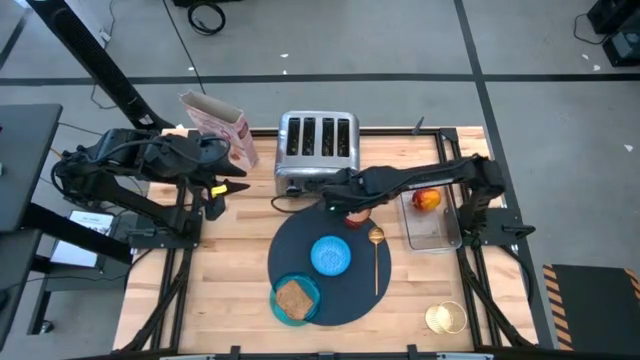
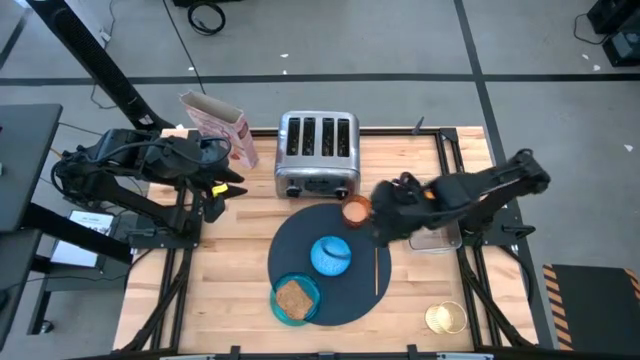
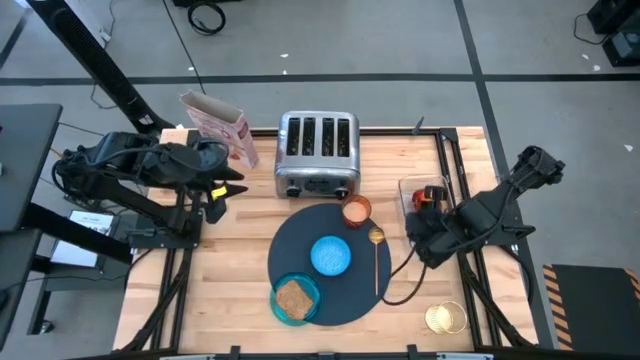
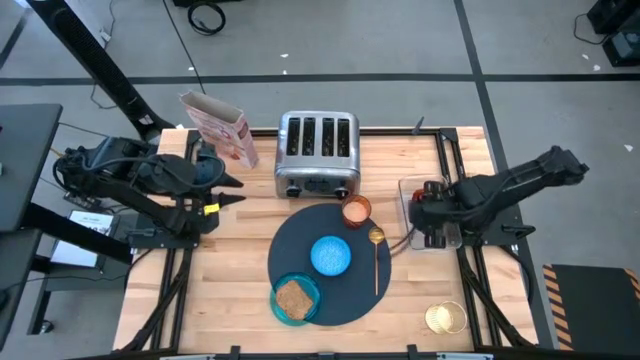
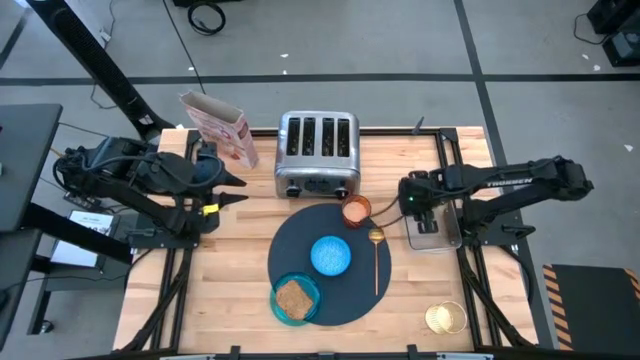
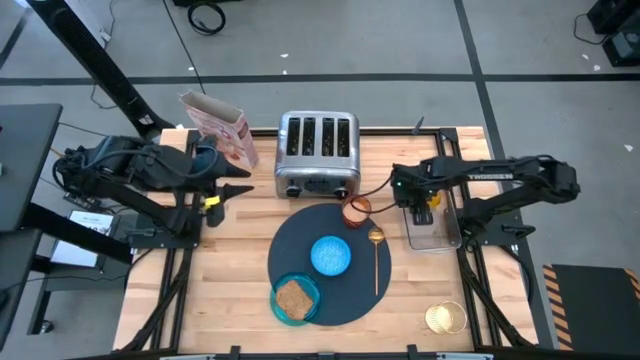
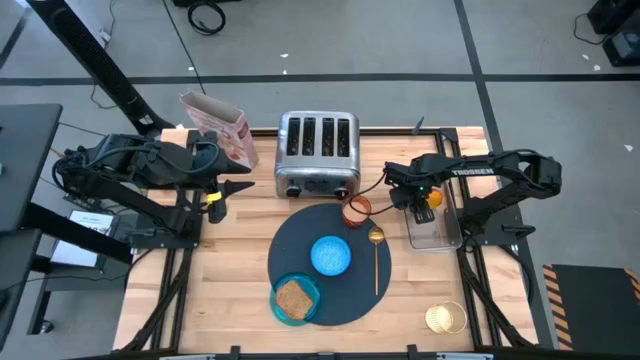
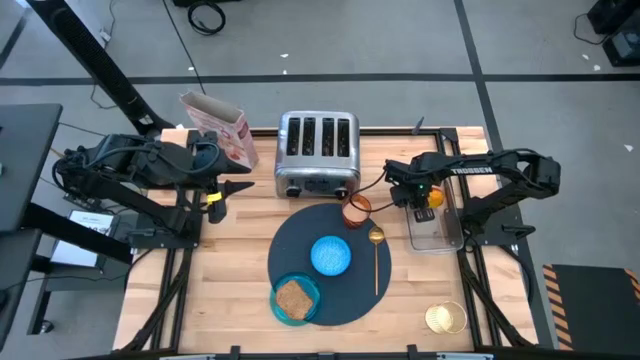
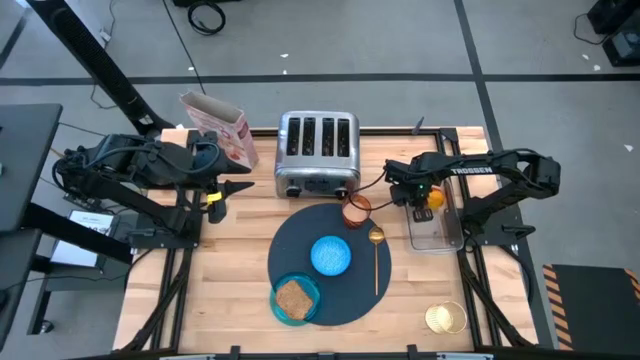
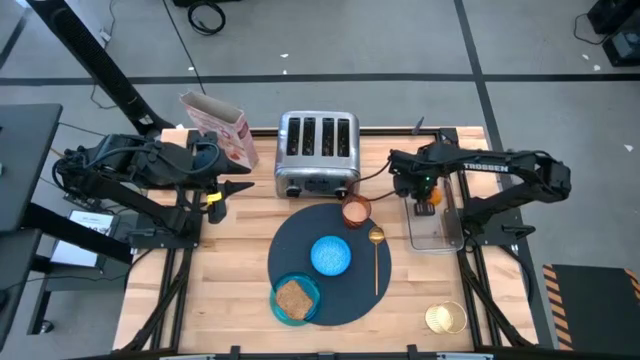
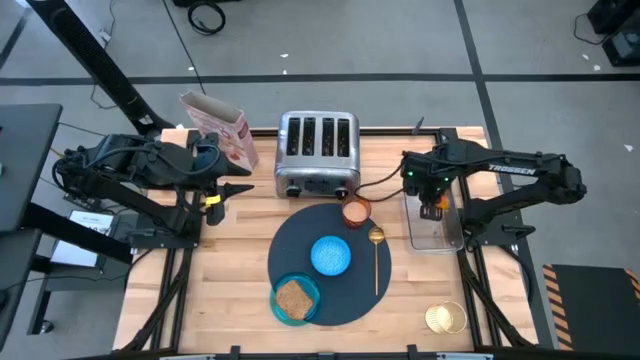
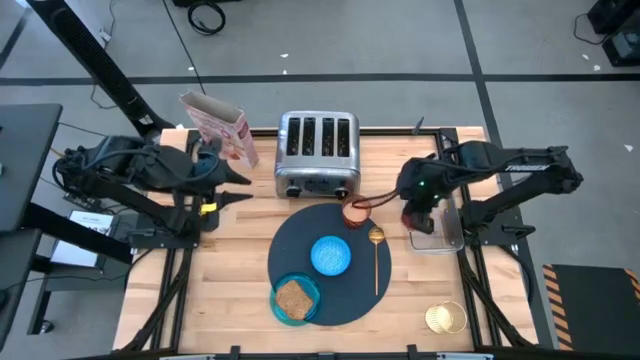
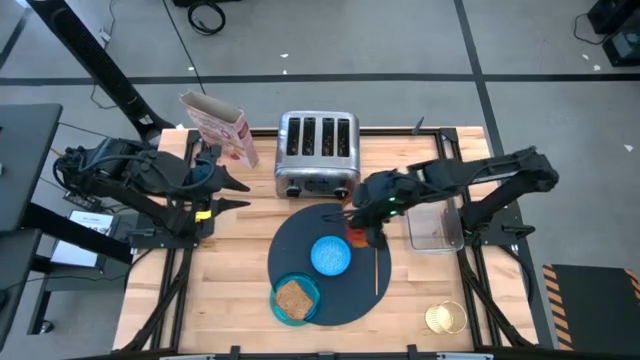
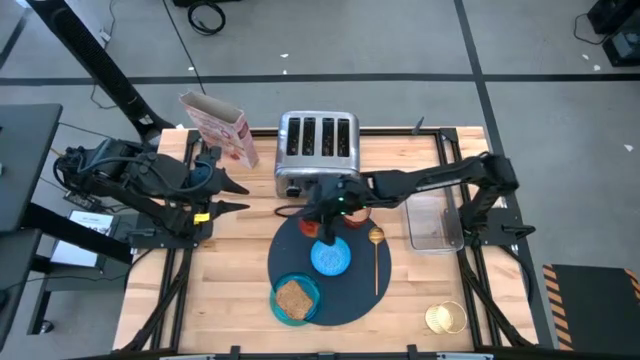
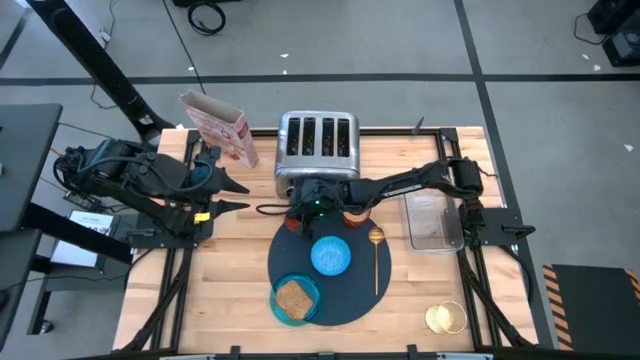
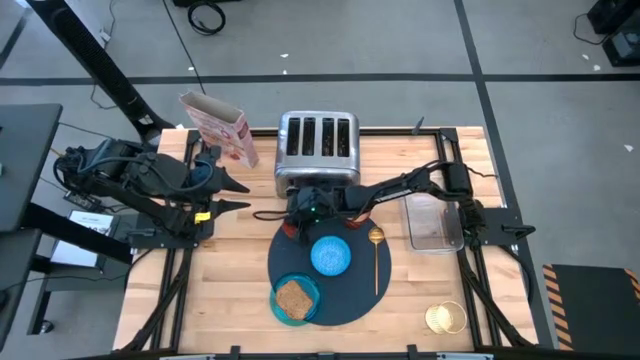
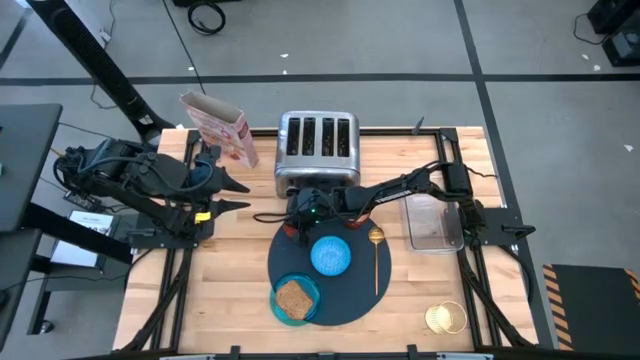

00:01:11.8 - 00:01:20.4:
Task: Arrange a breakfast setting
Put the red apple on the blue table mat

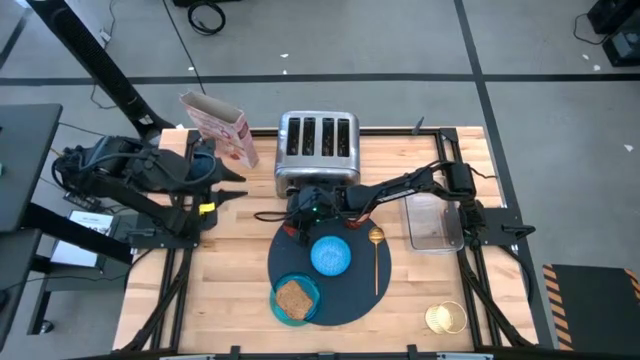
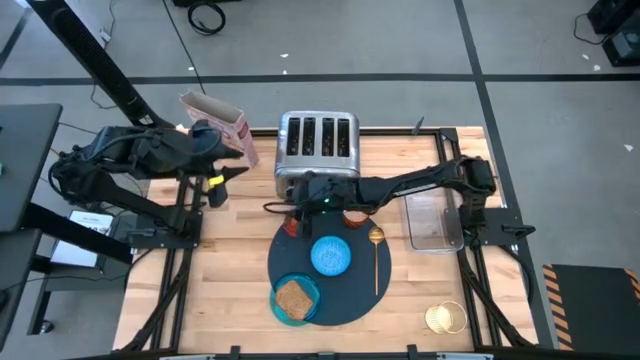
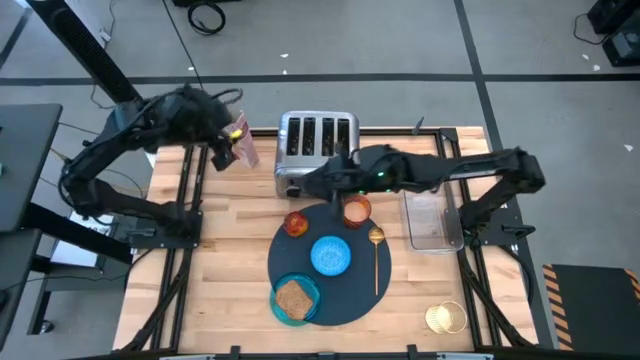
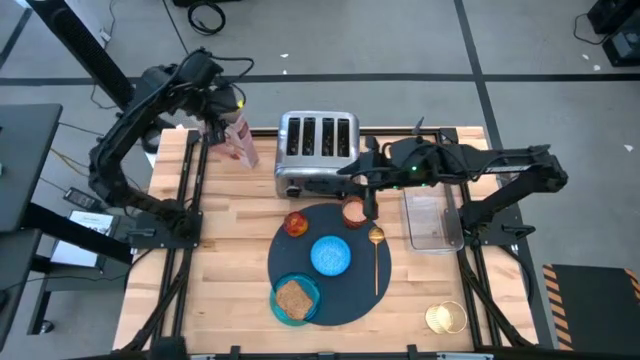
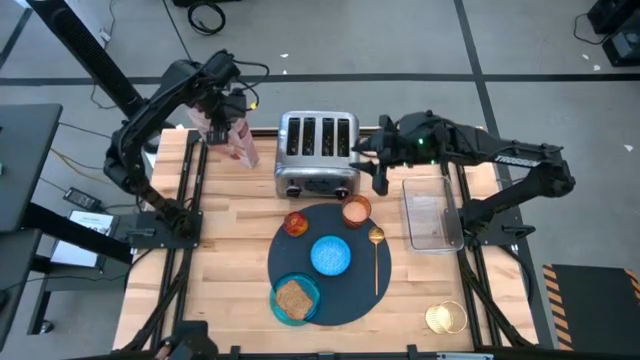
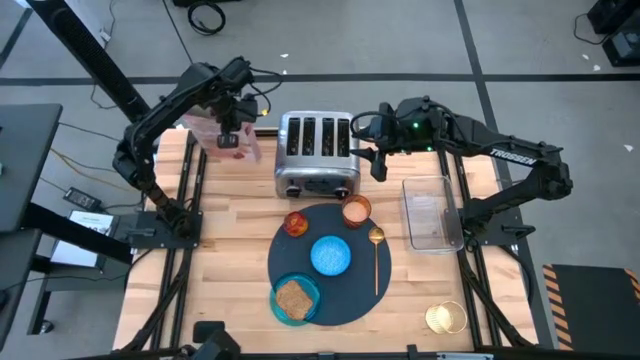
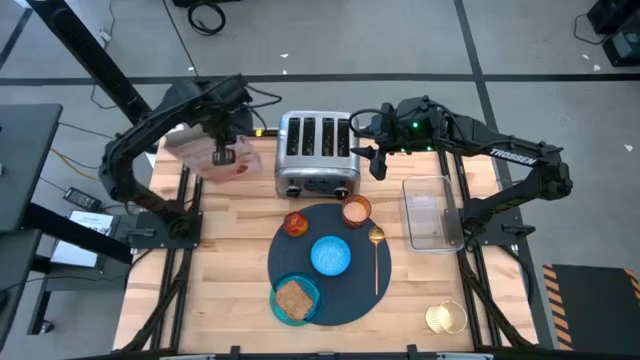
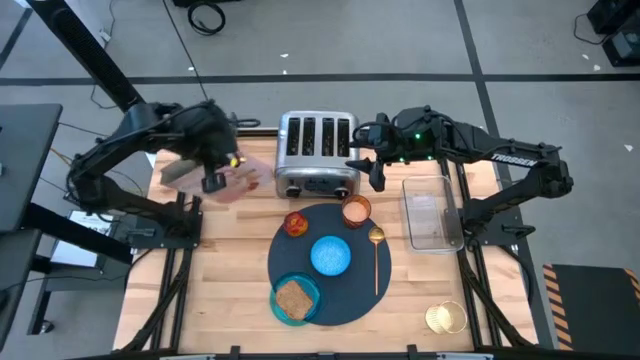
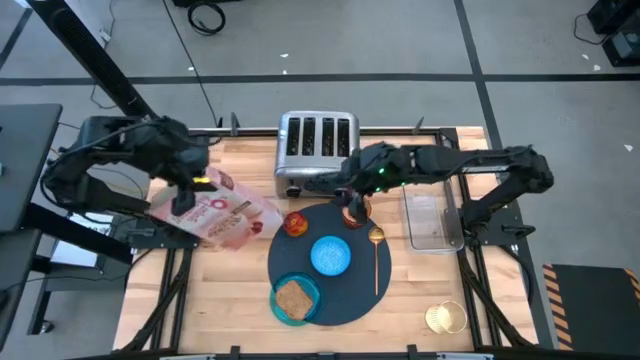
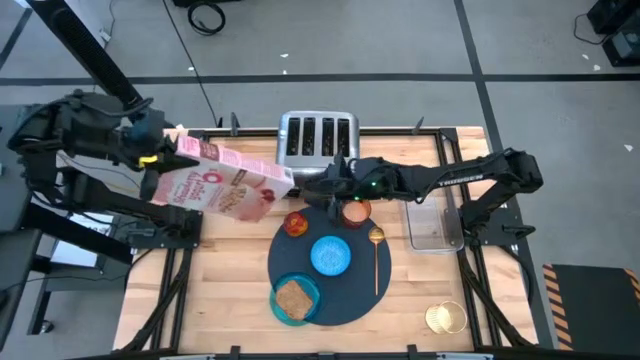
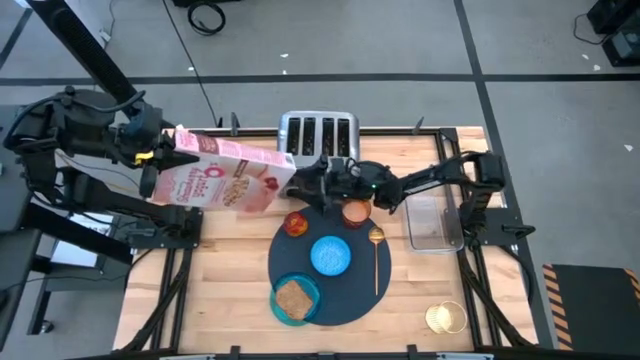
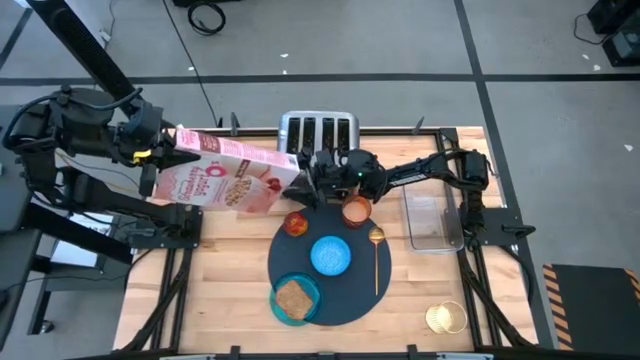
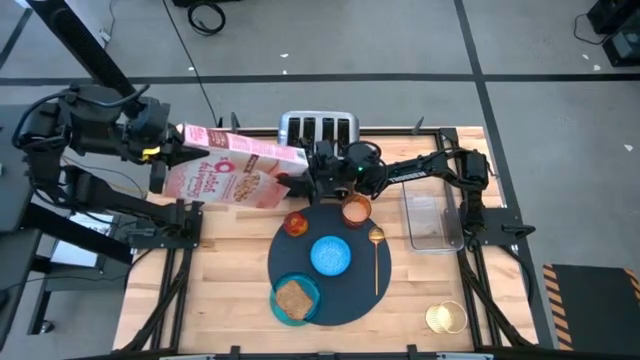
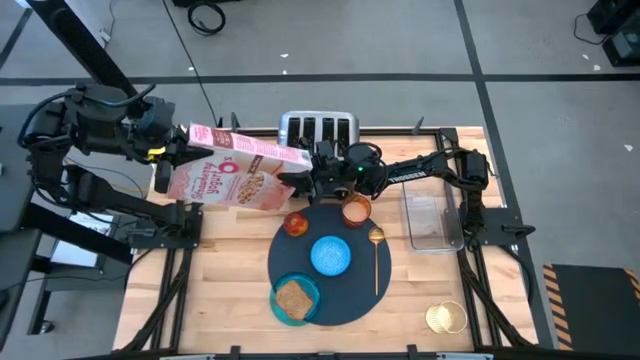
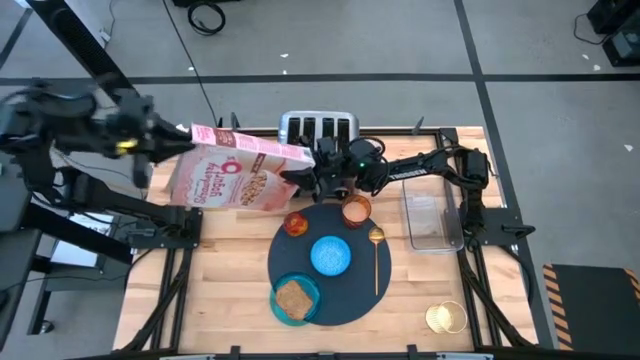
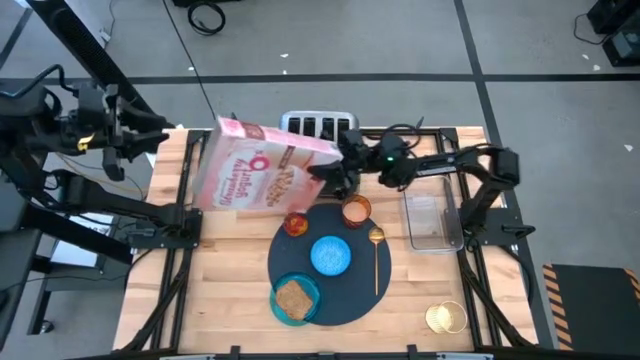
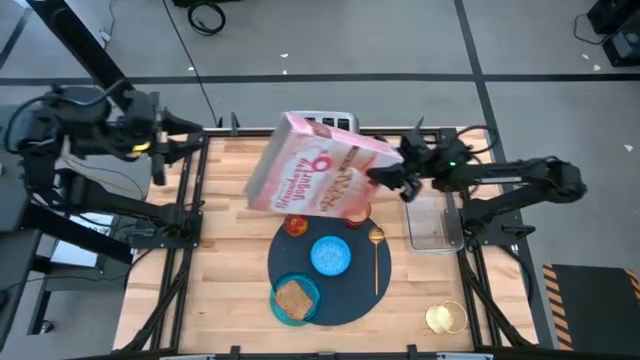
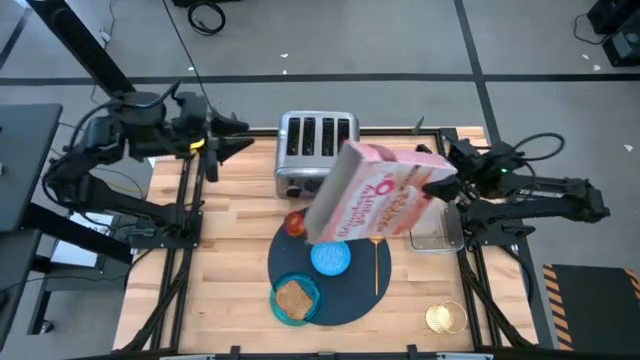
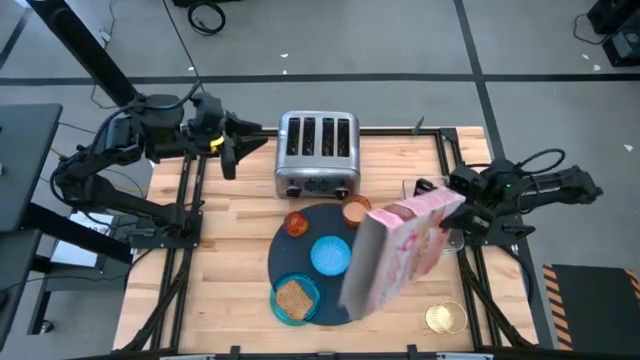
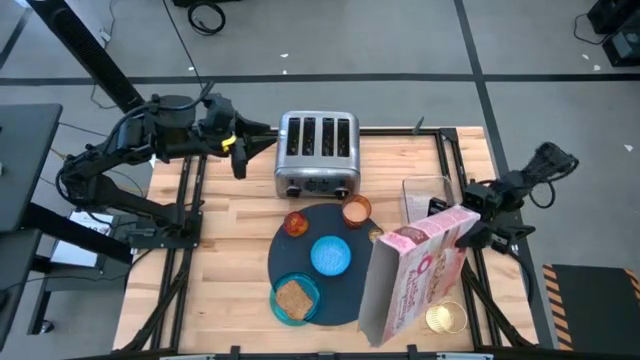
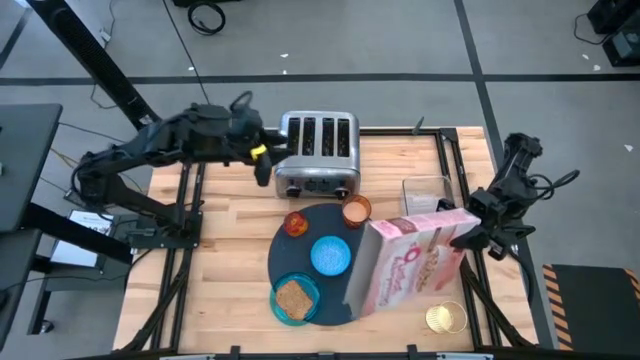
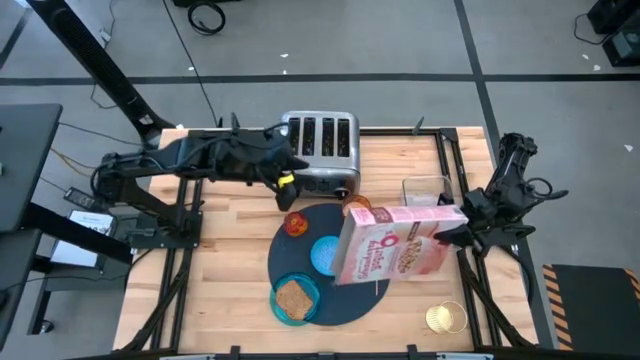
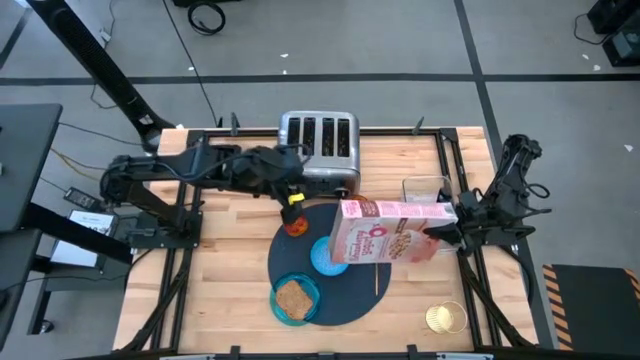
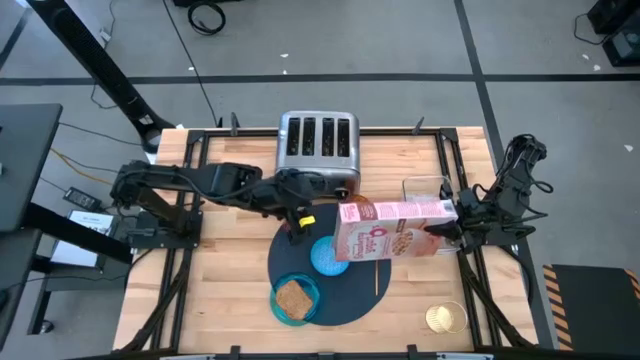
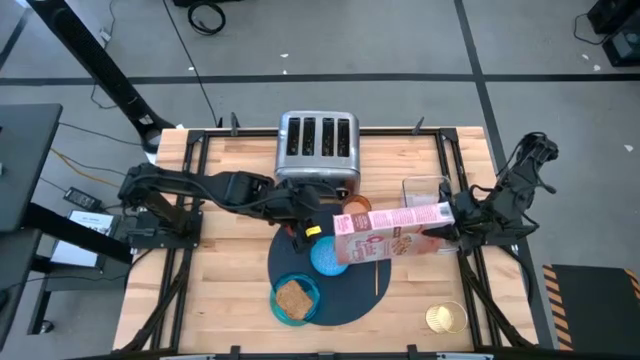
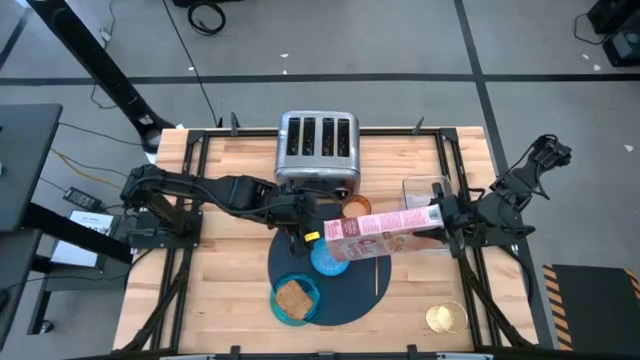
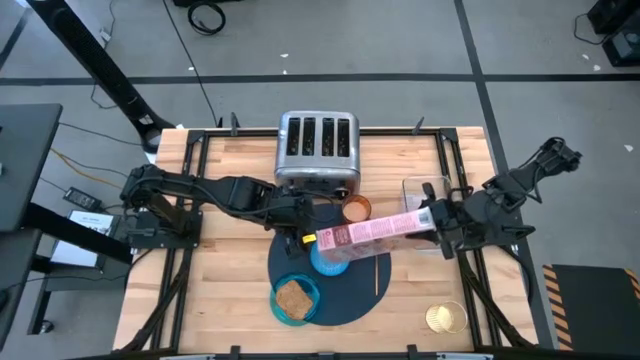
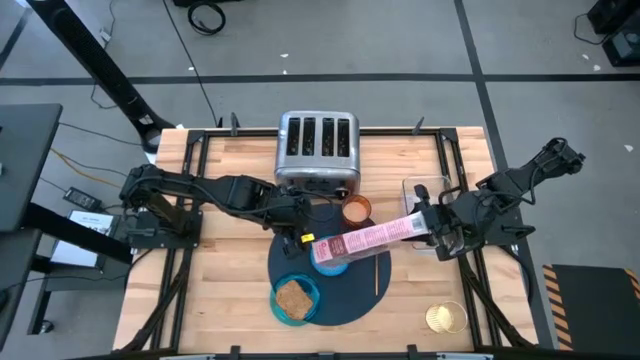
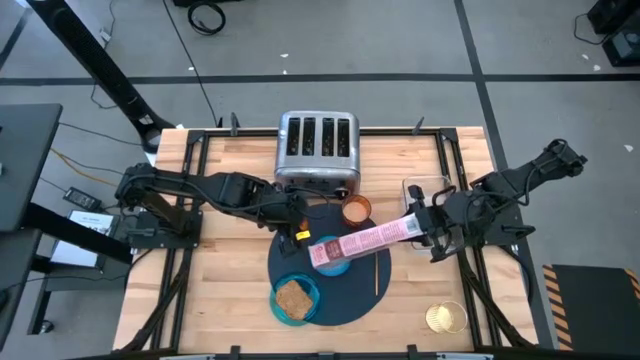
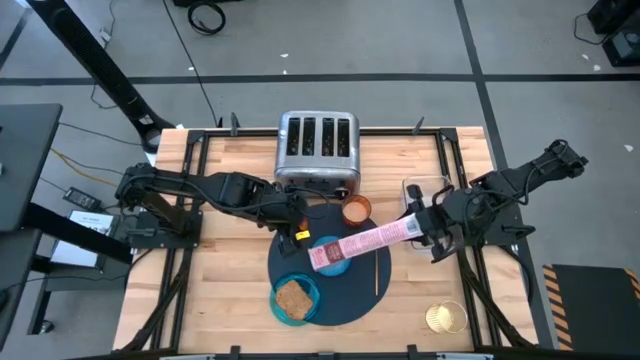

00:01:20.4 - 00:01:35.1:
Pour the cereal into the orange and blue bowl

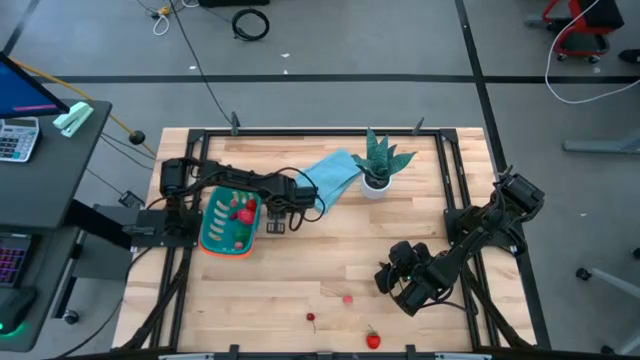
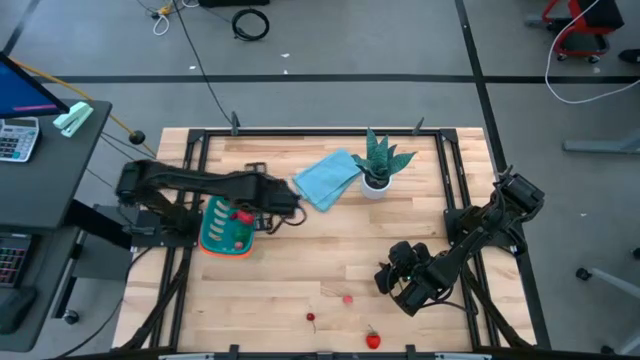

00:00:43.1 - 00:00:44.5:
Task: Pick and placing Produce into tupperware
Put the top pink peach into the blue basket
